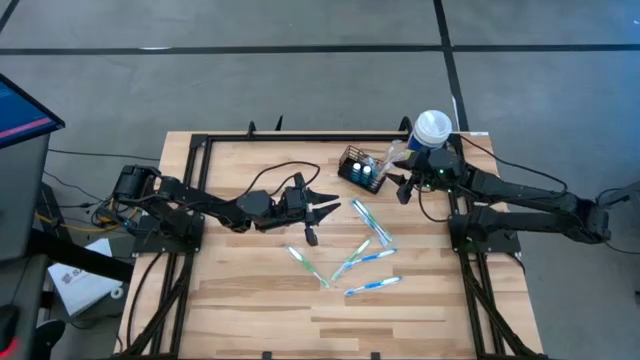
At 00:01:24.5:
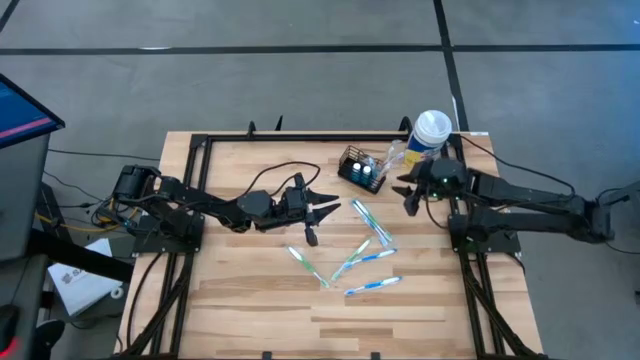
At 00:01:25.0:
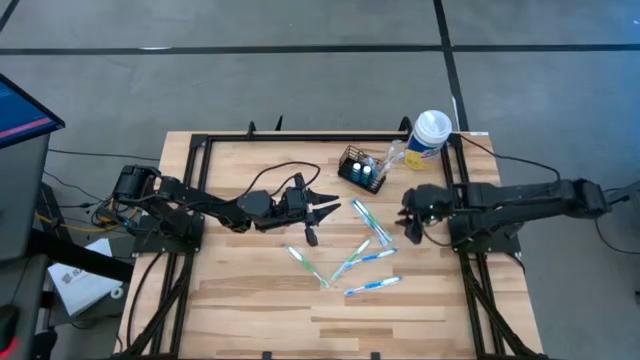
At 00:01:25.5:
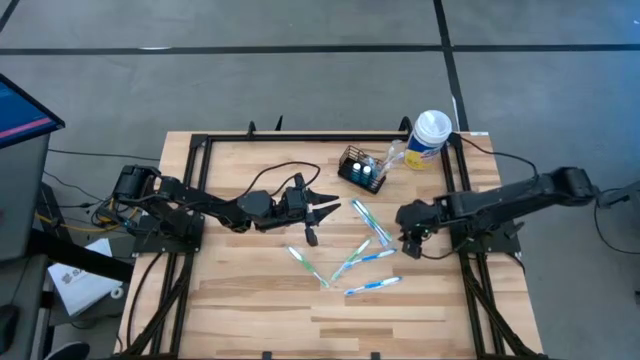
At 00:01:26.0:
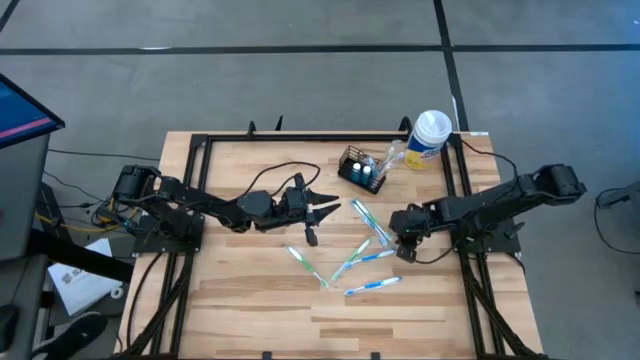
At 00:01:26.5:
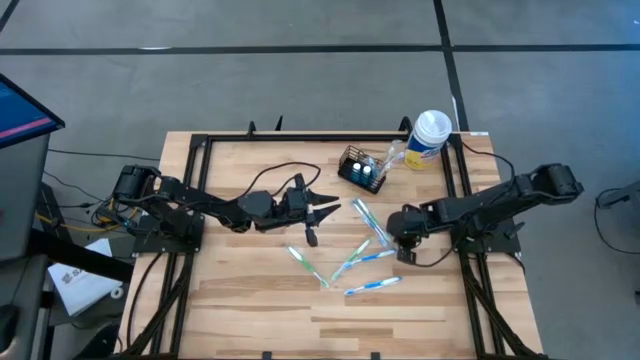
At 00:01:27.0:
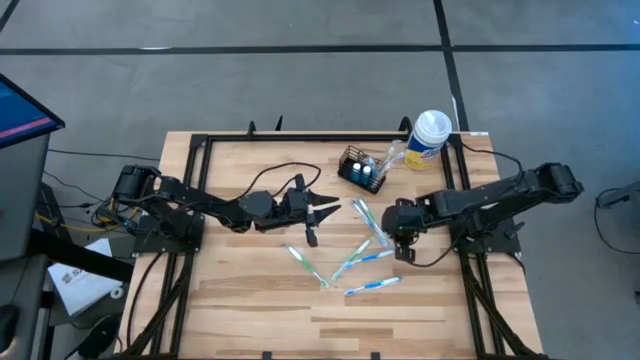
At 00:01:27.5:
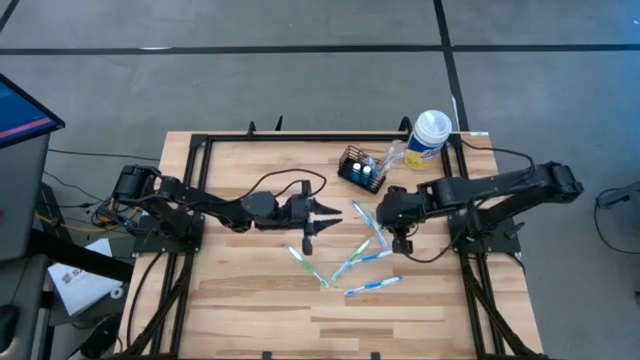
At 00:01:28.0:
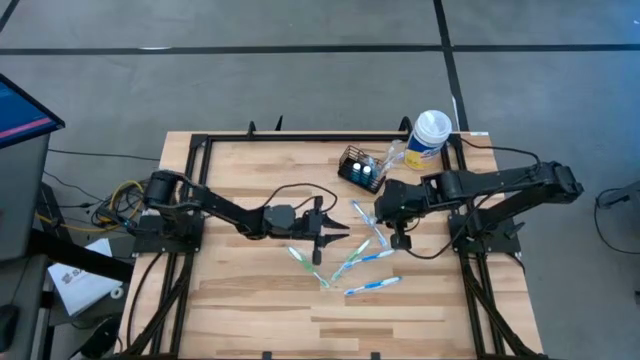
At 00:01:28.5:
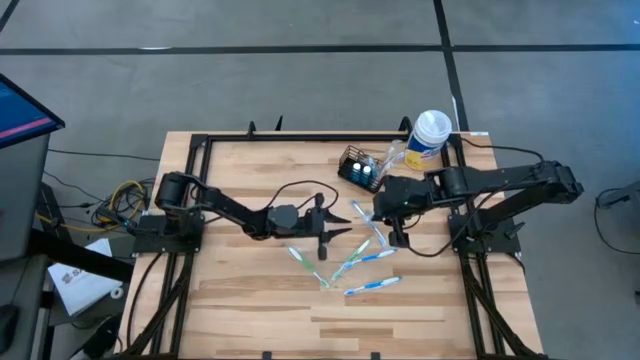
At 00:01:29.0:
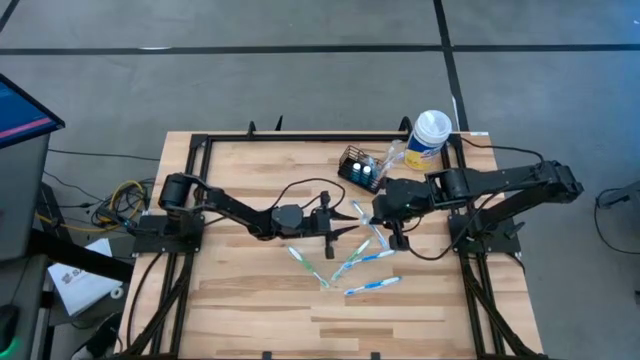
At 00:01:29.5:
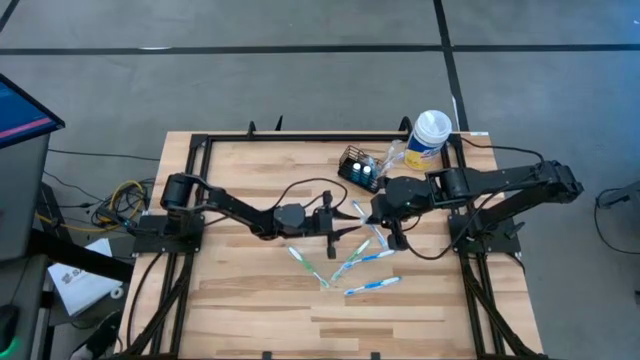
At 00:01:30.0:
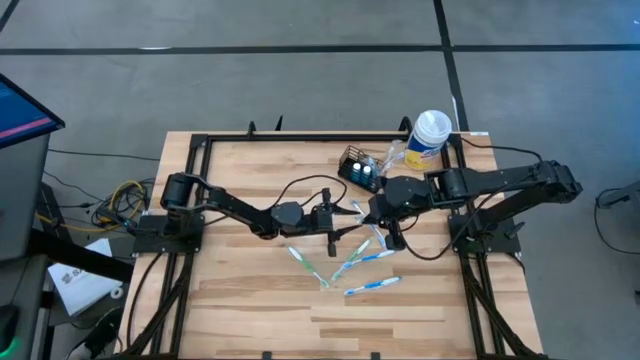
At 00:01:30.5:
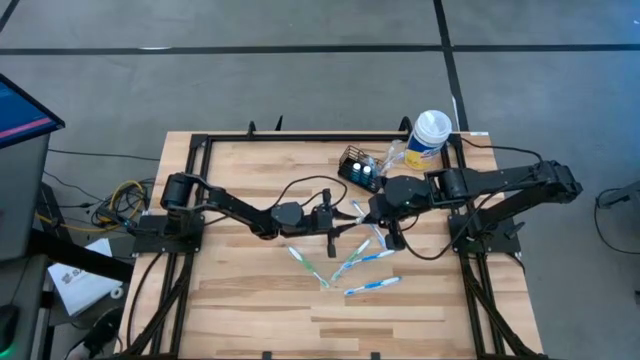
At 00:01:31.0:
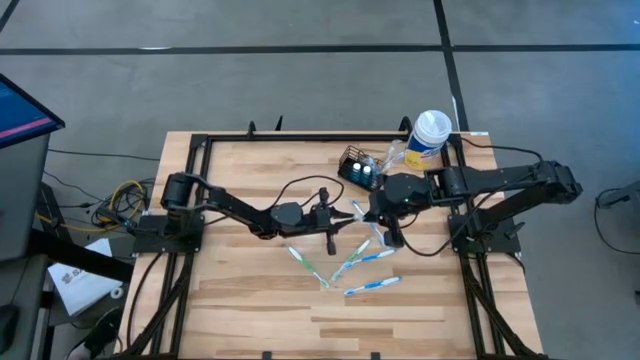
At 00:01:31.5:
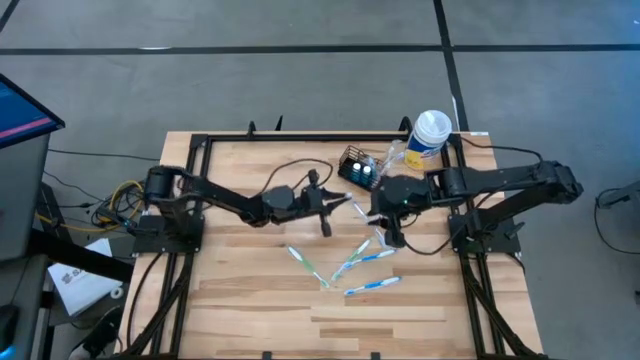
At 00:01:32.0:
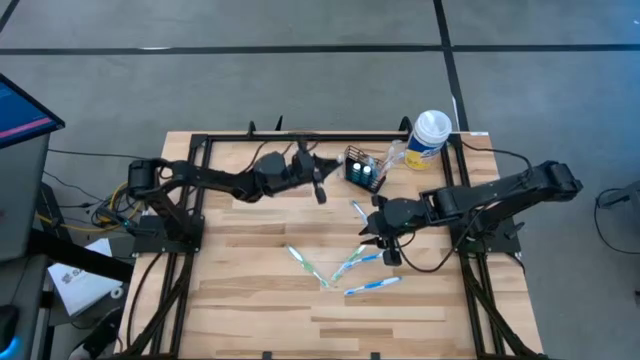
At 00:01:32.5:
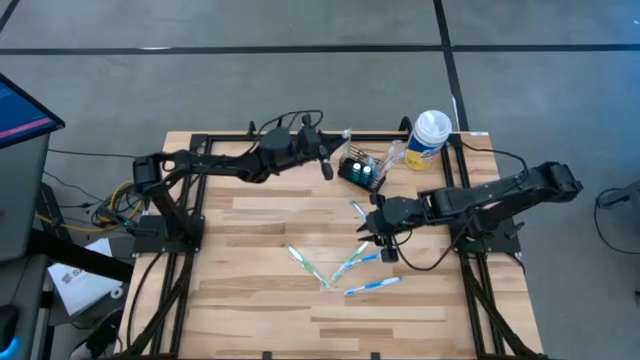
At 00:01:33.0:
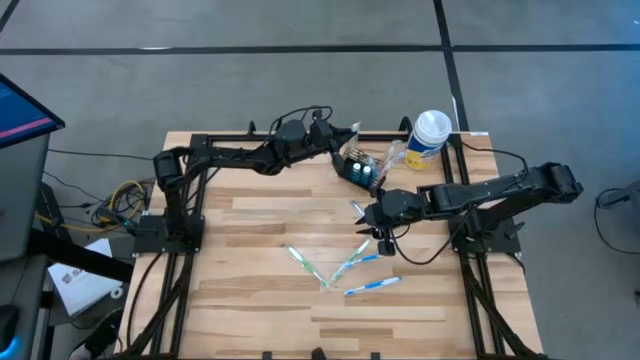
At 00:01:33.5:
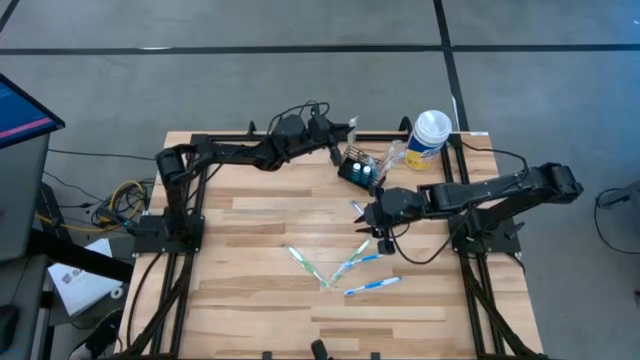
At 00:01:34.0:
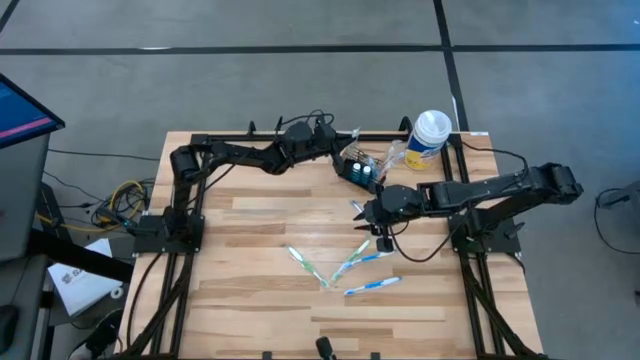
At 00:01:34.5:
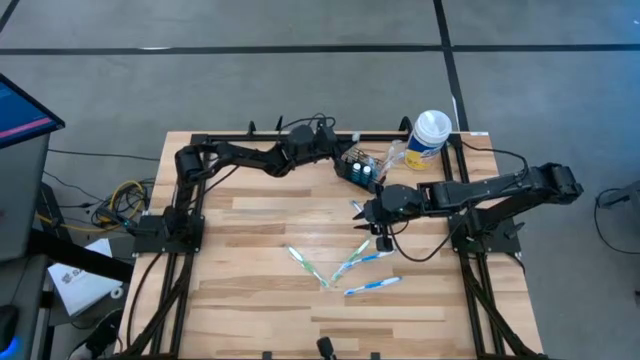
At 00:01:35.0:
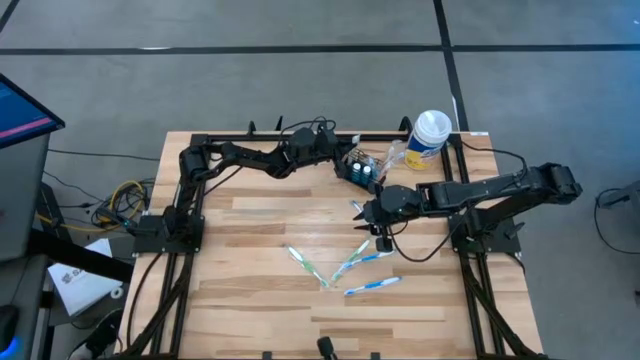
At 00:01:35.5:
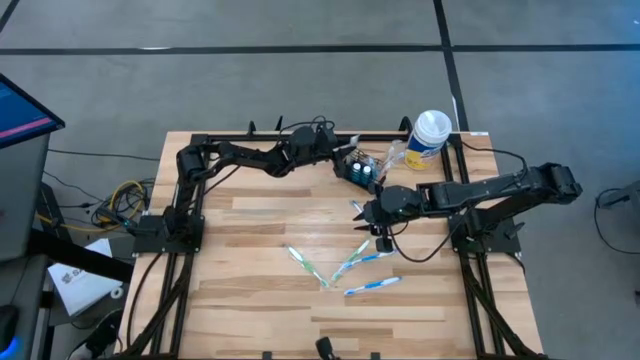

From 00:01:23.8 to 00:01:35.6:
Task: Pick & Place toothbrushing station
Put the green toothbrush into the mesh organizer

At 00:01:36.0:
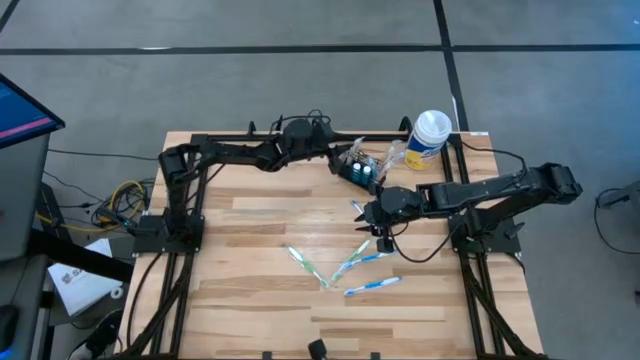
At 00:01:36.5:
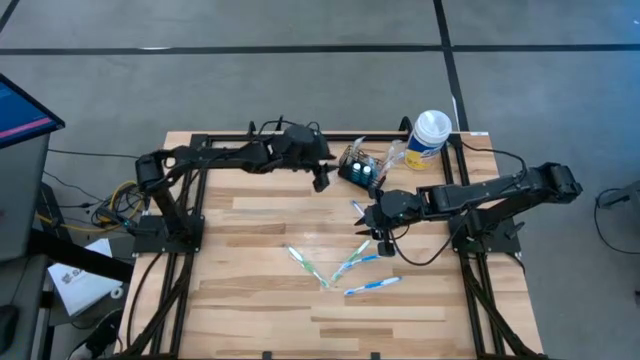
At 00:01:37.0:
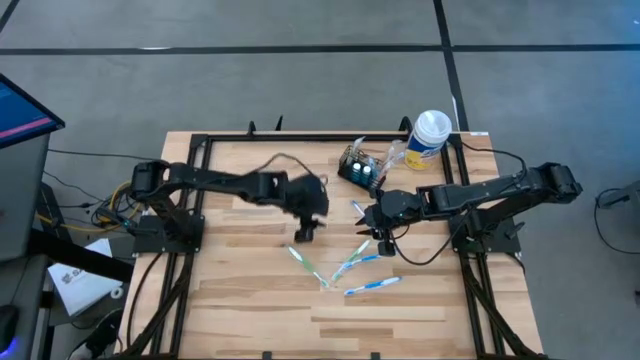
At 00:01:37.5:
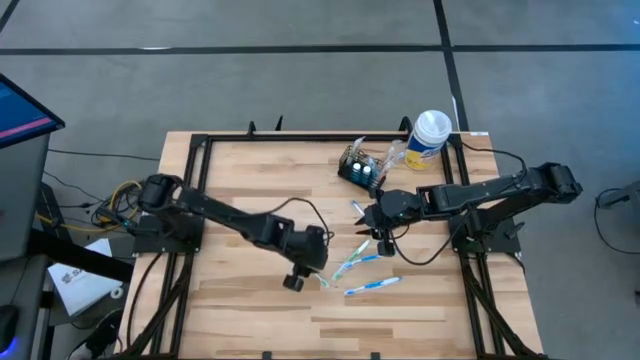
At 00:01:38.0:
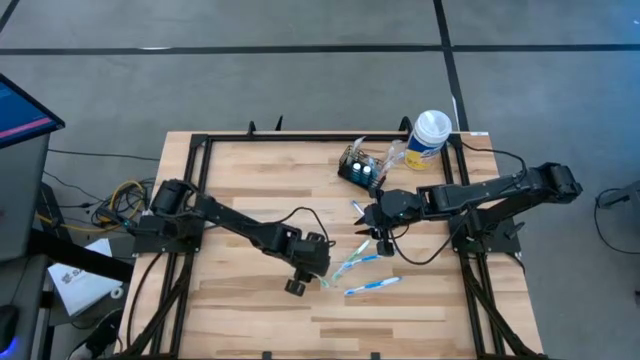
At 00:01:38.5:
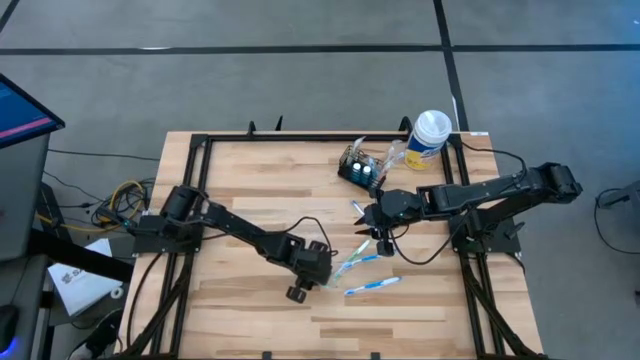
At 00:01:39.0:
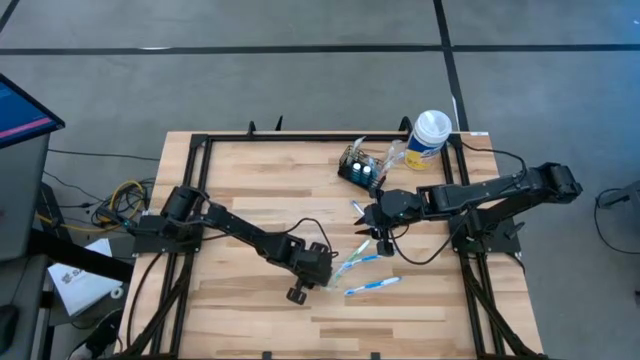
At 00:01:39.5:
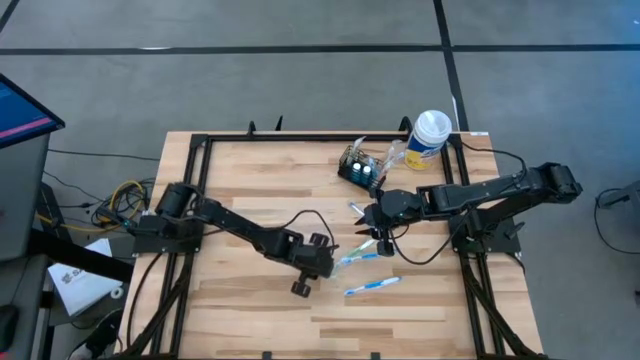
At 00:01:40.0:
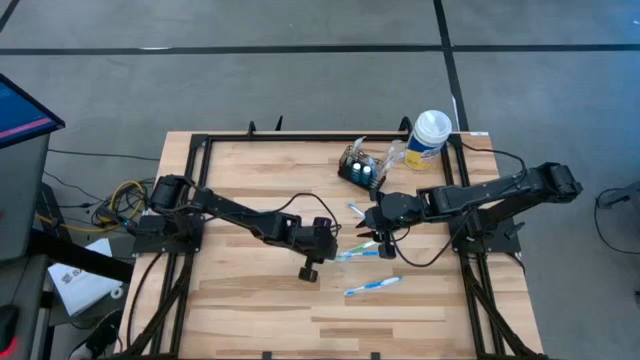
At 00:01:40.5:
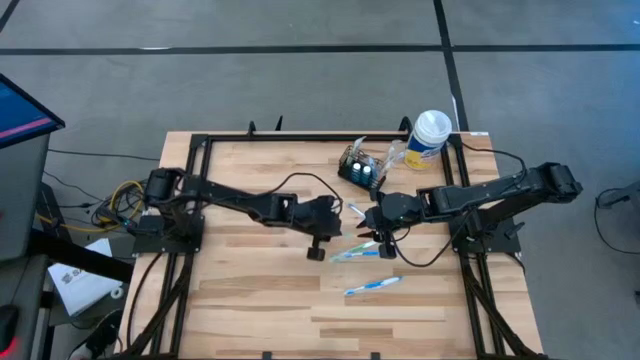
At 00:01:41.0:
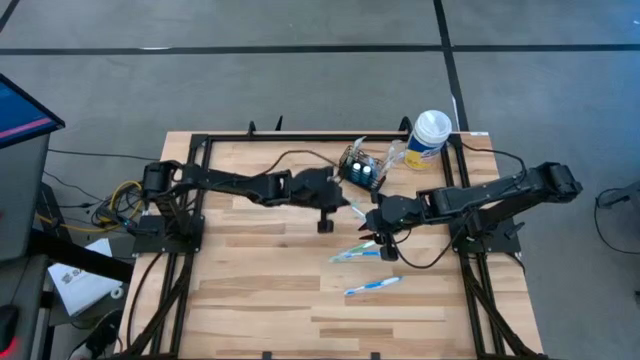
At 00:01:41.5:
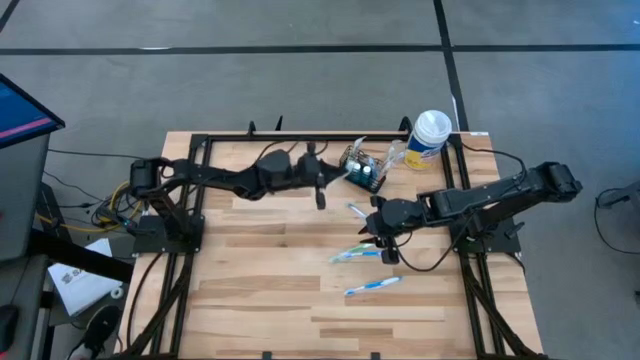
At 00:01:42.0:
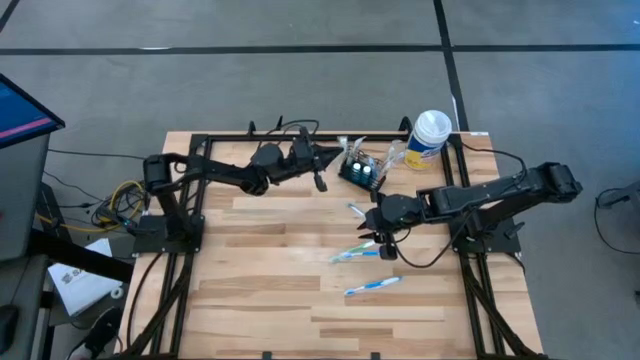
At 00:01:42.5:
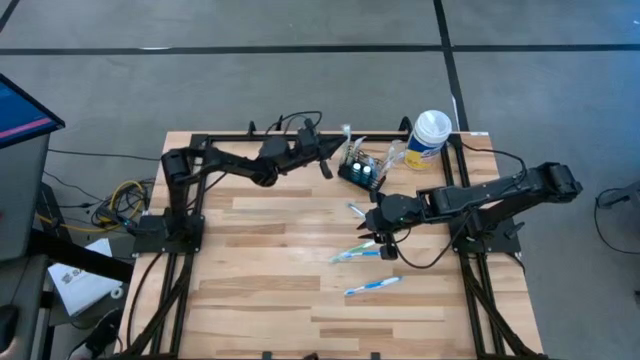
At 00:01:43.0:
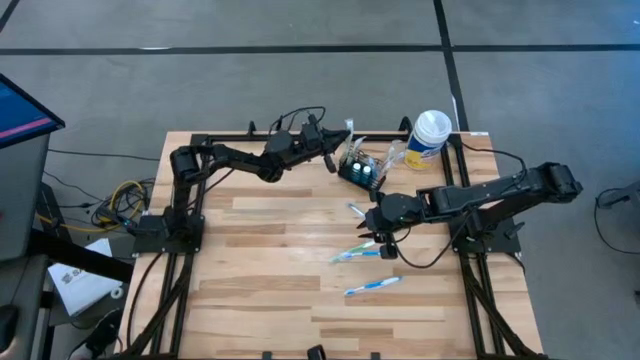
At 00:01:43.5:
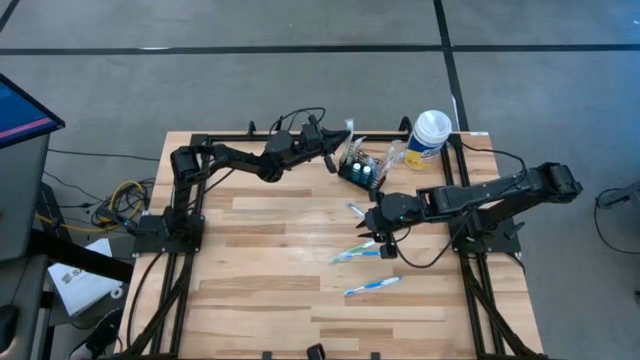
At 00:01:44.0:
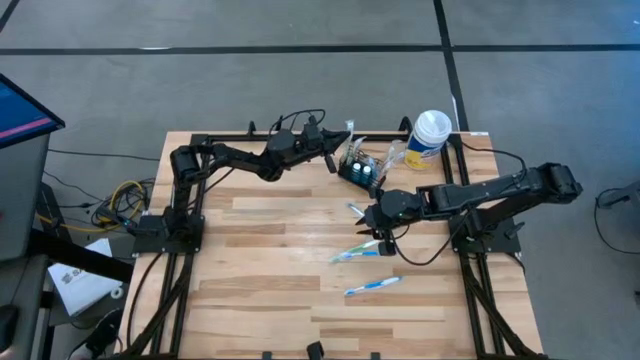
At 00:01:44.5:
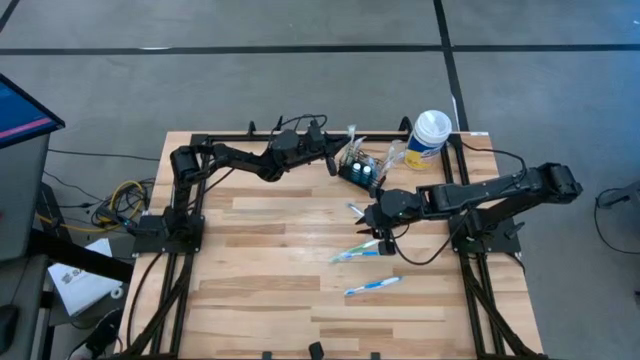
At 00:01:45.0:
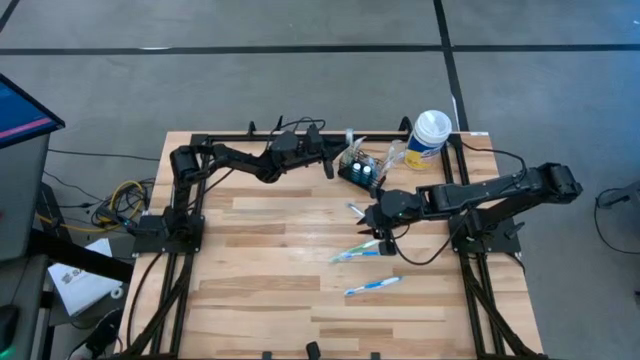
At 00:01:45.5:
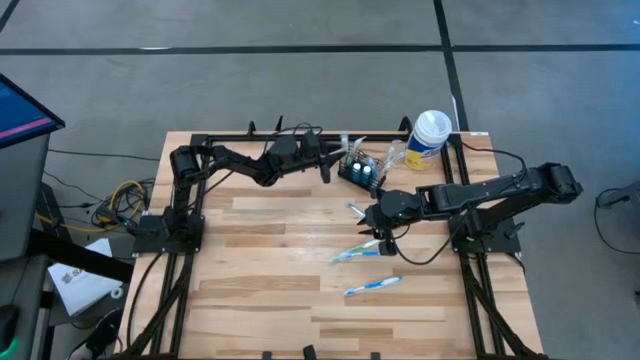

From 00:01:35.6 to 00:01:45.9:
Put the green toothbrush into the mesh organizer
